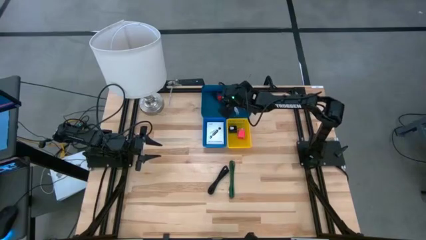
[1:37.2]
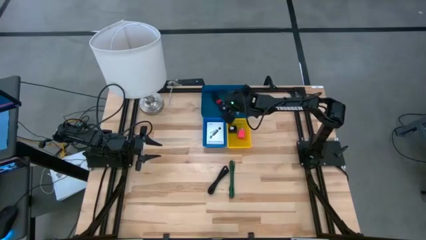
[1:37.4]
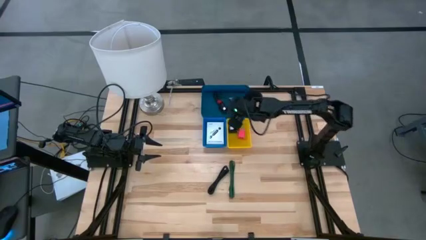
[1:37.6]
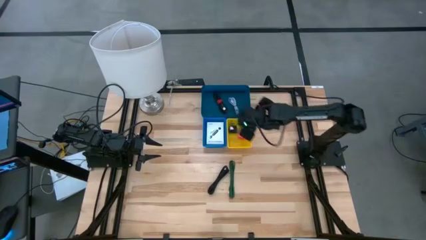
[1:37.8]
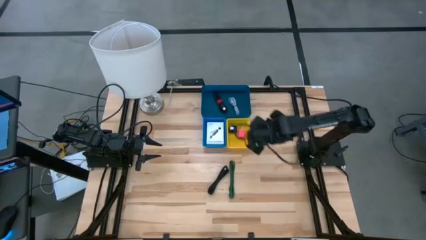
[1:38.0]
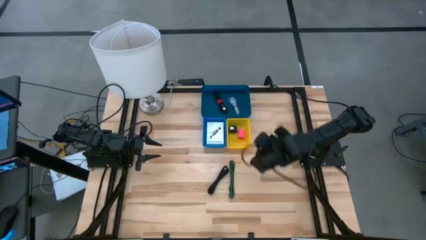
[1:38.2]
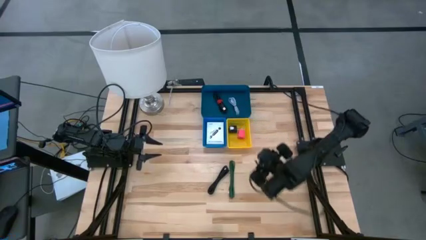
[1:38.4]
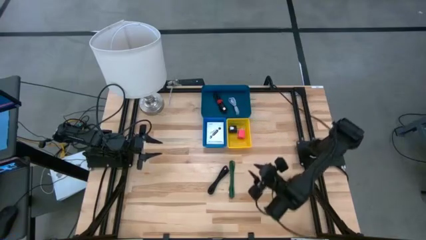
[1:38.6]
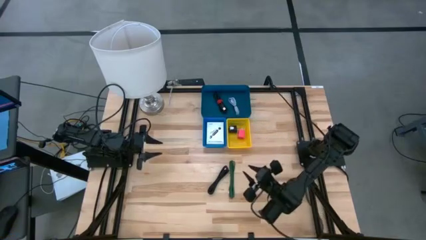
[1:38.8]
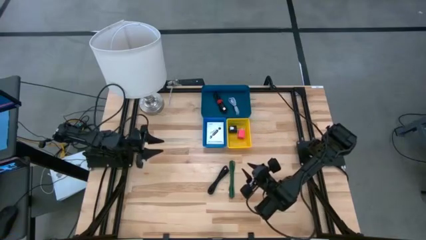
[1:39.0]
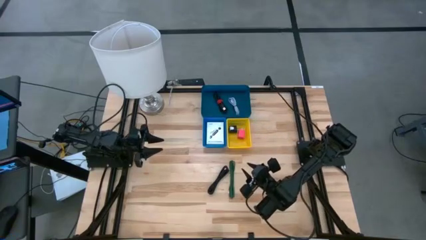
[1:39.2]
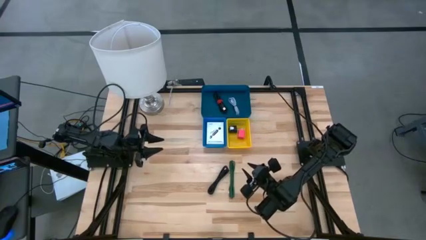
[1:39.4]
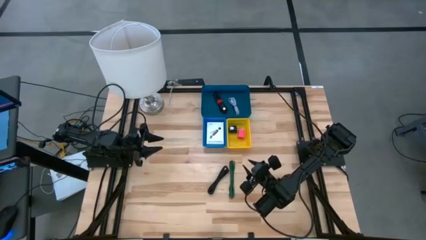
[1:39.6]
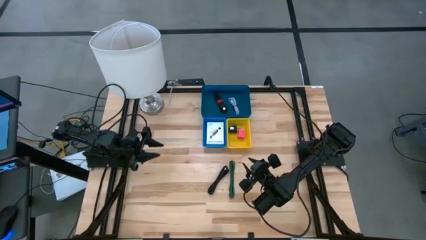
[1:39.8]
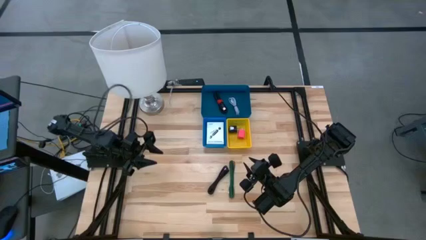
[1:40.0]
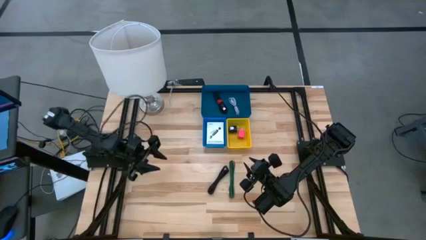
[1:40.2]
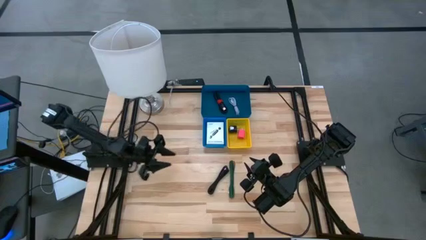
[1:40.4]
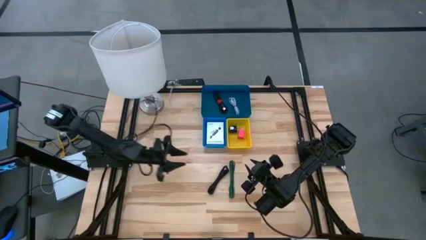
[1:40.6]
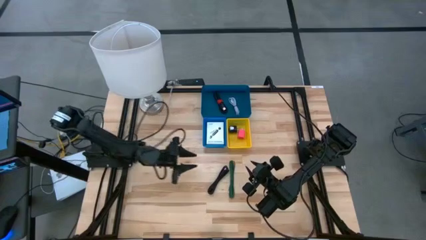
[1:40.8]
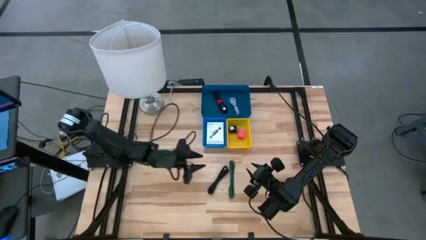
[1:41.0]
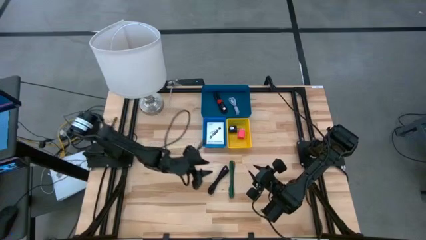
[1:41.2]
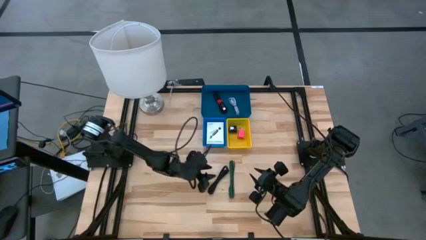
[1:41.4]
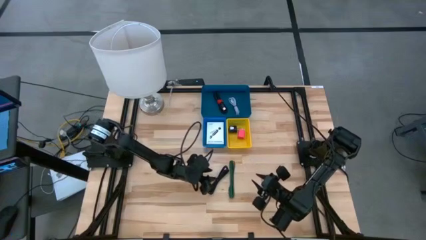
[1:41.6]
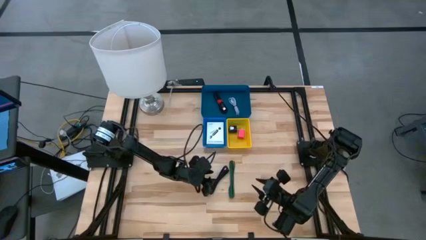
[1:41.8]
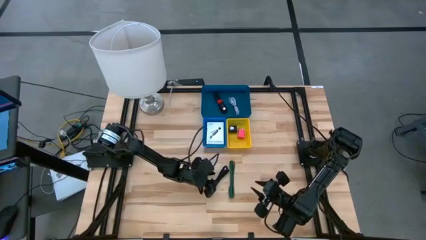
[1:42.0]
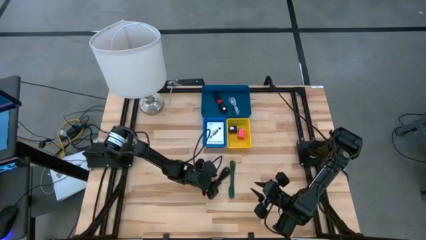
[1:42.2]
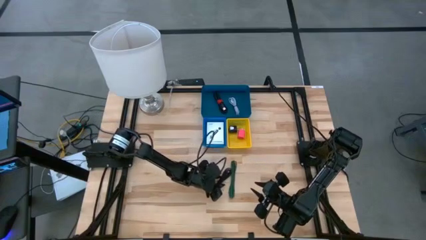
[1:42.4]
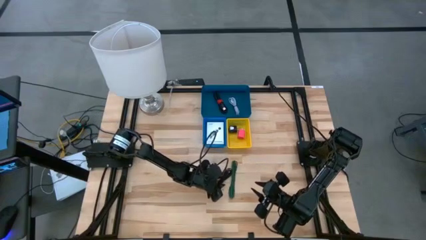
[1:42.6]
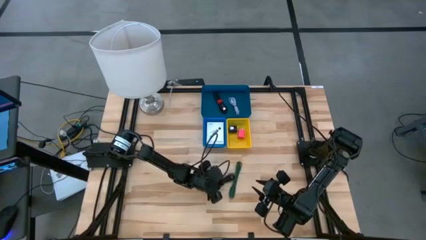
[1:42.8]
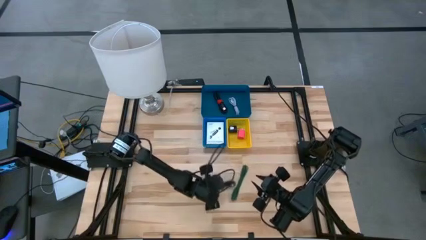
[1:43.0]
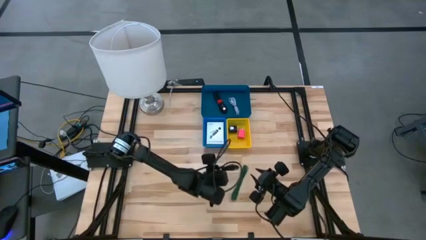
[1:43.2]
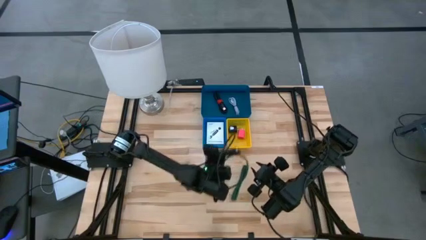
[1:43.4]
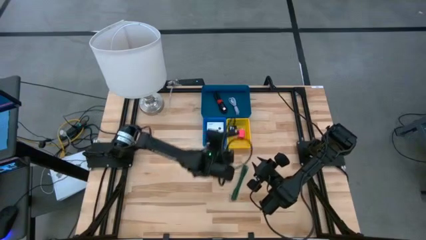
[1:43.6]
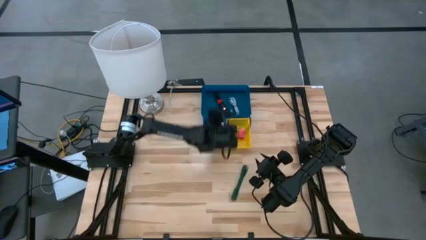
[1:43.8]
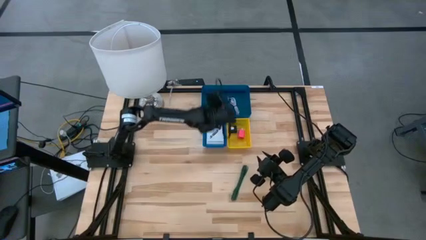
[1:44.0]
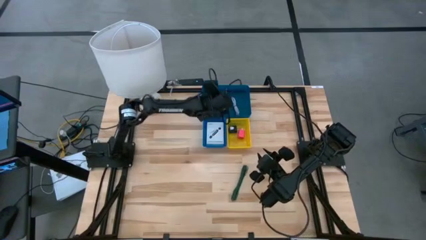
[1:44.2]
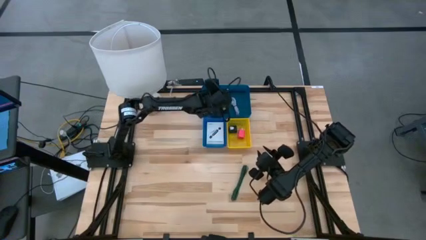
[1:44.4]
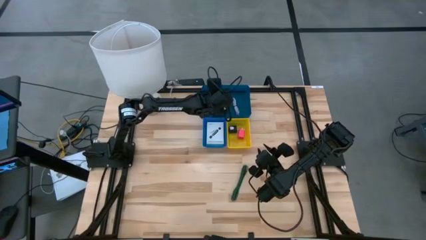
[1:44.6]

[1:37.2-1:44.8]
Task: Pick and place items into bin
Put the black charger cable into the dark blue bin

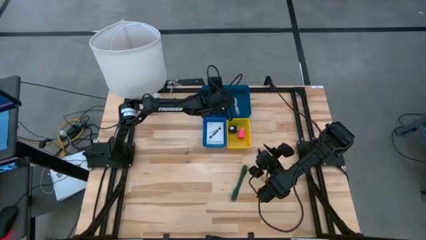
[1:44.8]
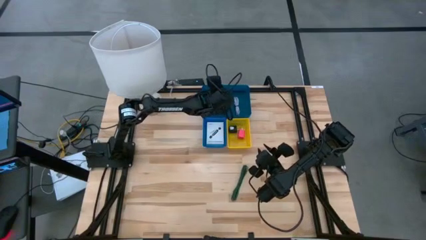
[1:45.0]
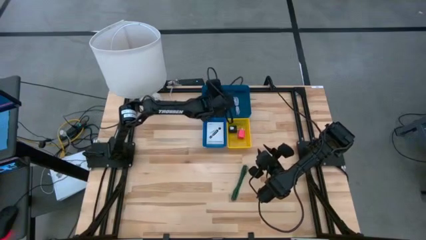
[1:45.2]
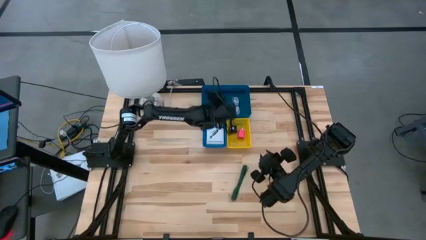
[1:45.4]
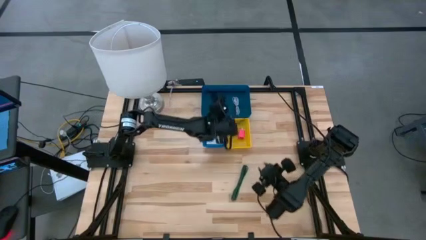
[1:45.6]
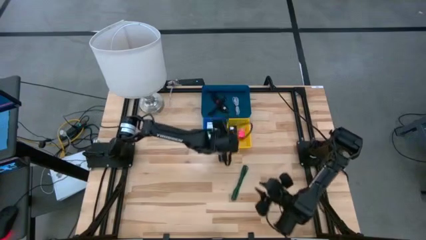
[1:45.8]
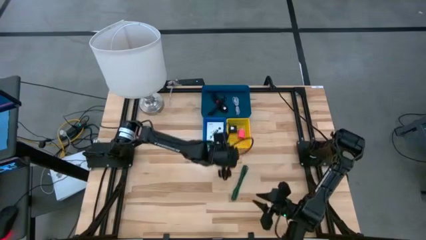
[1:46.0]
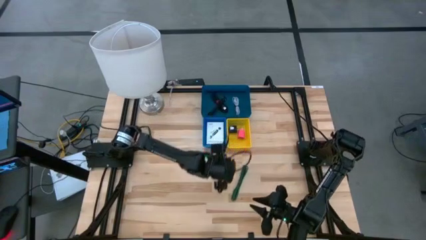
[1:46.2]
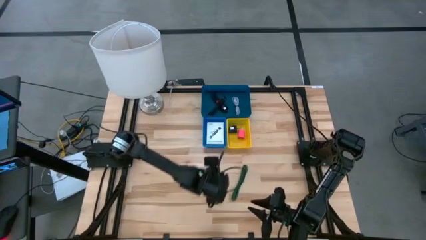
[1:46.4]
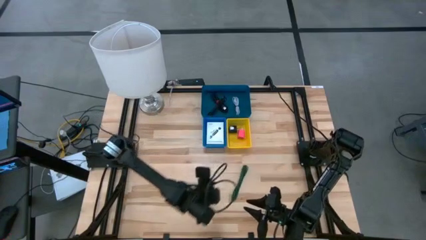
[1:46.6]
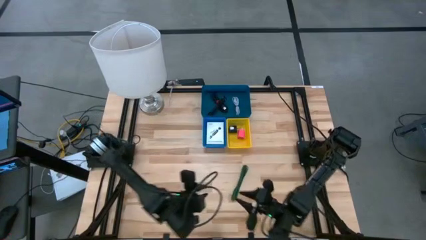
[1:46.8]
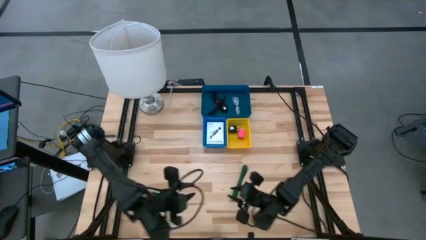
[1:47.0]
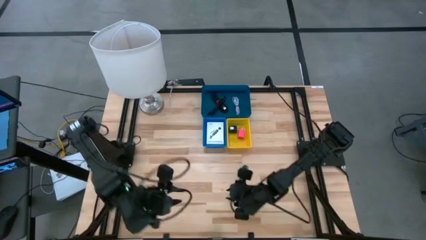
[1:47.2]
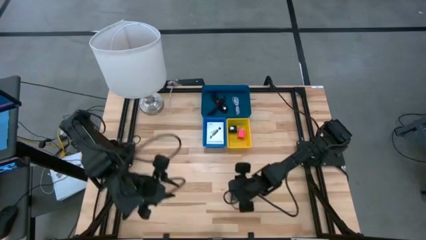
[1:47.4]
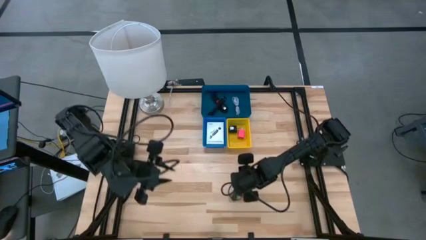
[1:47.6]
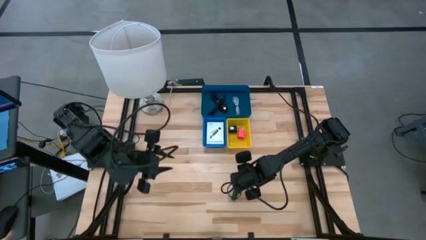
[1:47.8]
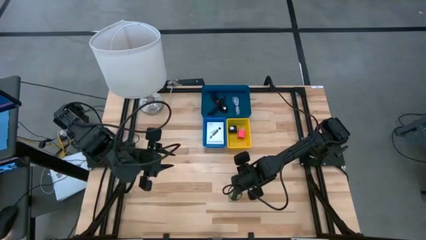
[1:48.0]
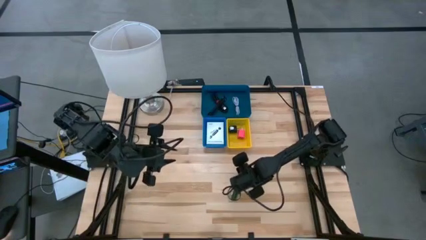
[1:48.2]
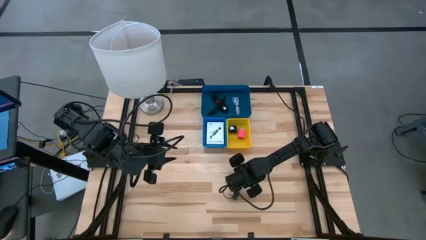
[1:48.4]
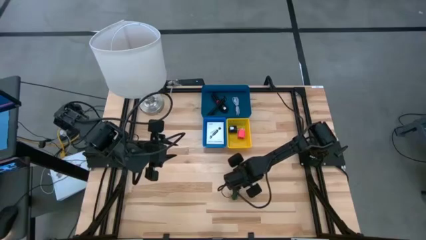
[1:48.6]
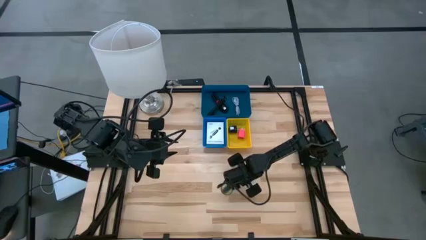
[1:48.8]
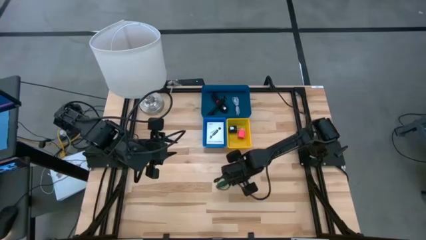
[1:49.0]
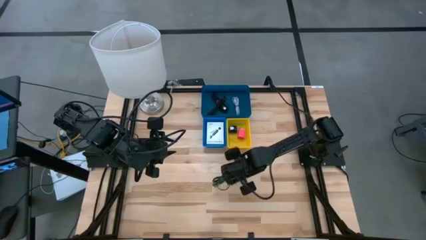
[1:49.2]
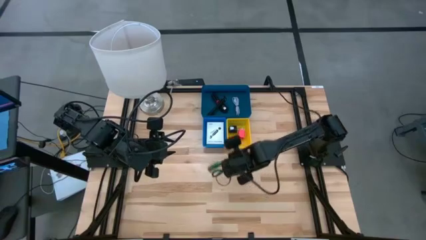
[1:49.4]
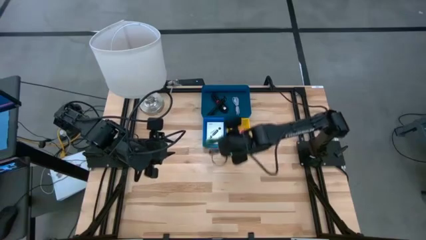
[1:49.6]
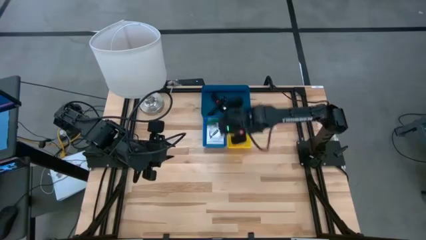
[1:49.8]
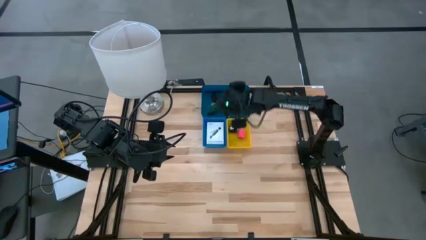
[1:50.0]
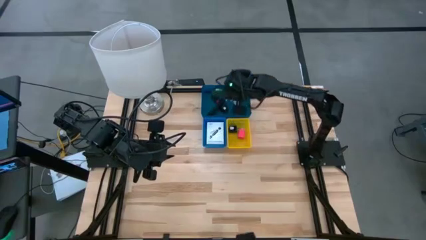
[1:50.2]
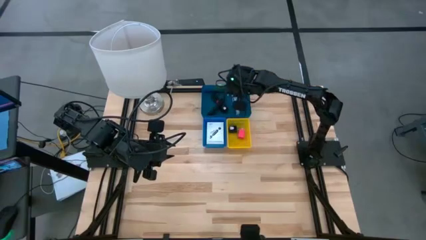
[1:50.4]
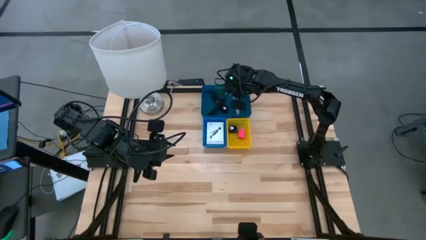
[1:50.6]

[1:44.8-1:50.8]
Put the green charger cable into the dark blue bin

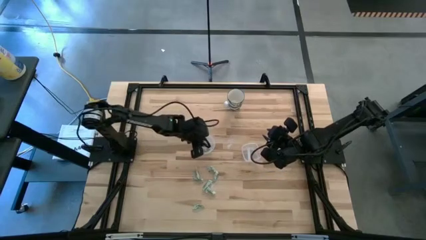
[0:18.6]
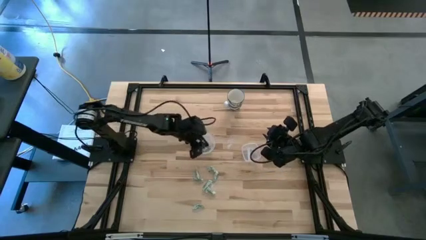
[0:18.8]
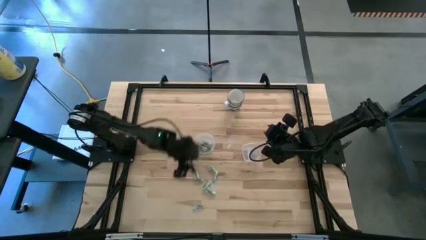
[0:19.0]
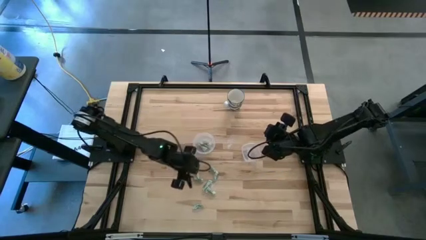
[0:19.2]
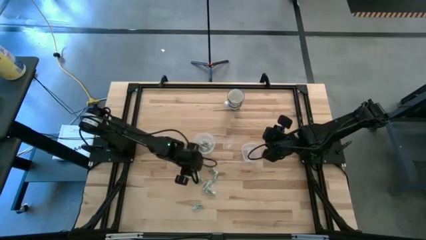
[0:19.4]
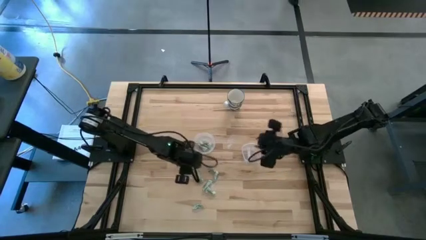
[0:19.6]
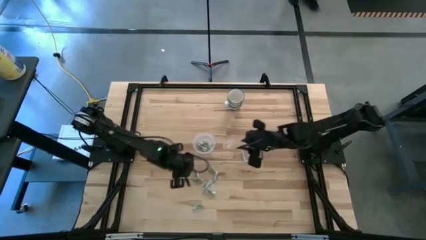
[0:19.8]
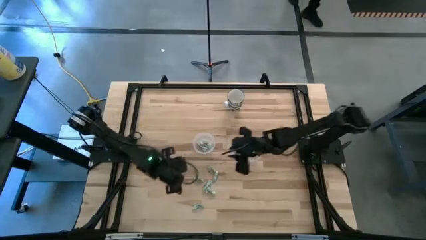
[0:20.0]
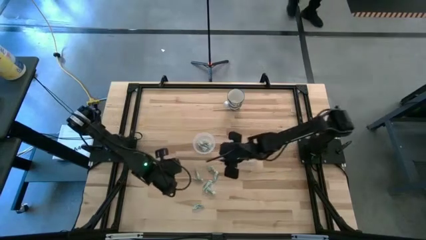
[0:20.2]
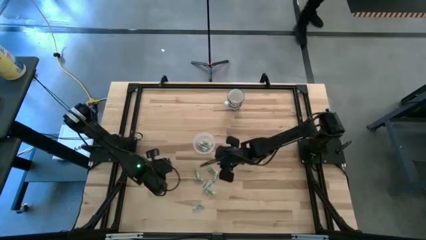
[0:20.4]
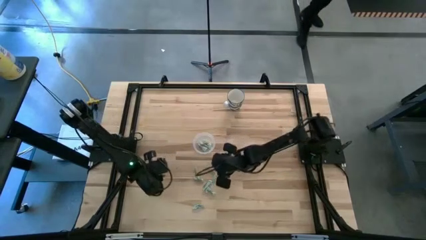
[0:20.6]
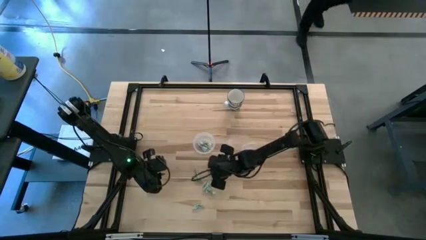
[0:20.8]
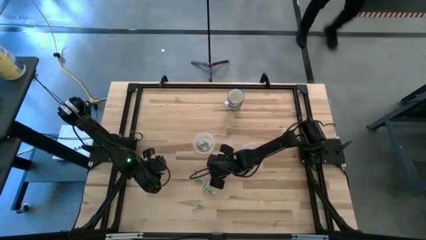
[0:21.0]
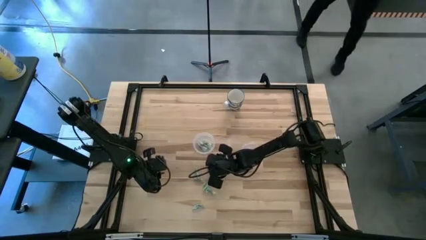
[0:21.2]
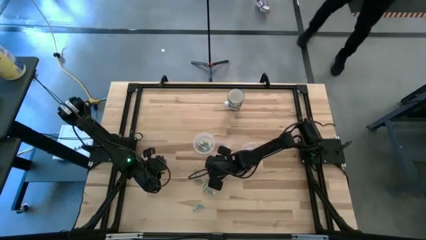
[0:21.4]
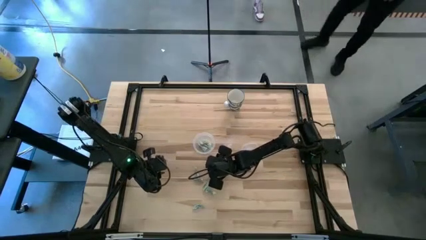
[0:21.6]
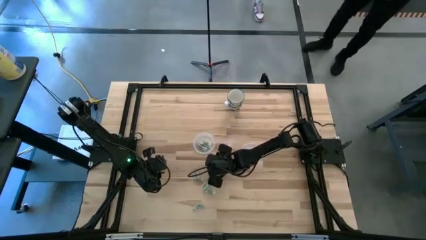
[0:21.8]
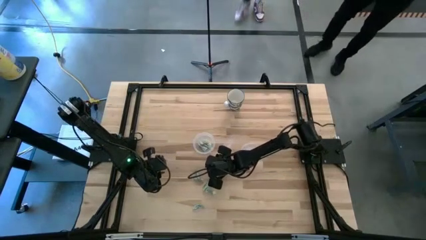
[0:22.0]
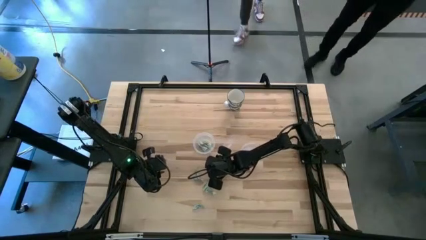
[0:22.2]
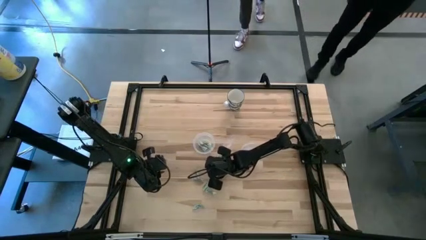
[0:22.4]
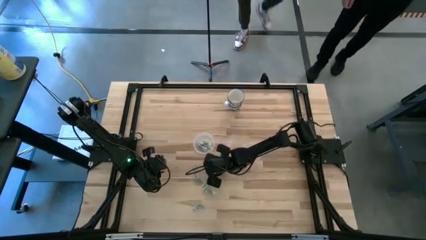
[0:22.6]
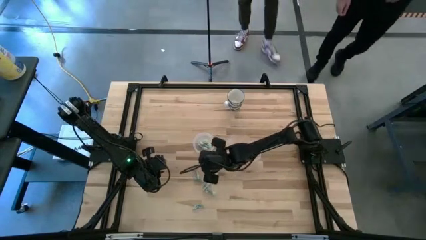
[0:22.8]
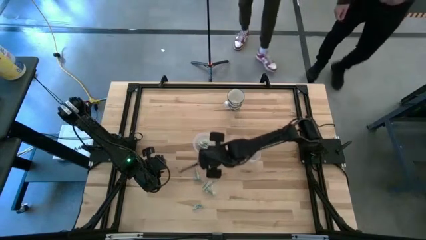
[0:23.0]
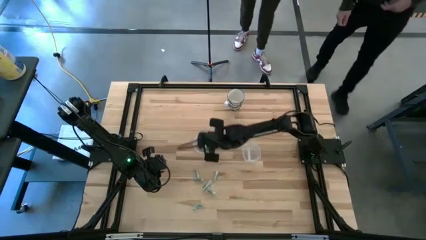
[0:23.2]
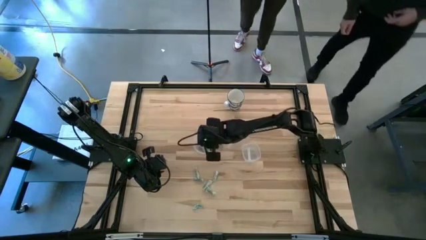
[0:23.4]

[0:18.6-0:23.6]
Task: Pick and place Stevia / Truvia into bins
Put the green stevia packet into the left transparent container
